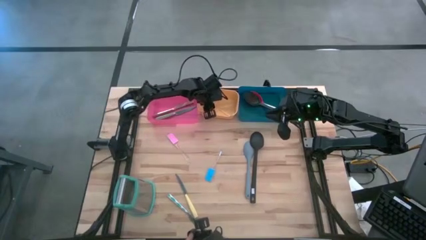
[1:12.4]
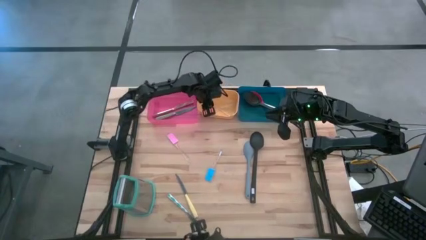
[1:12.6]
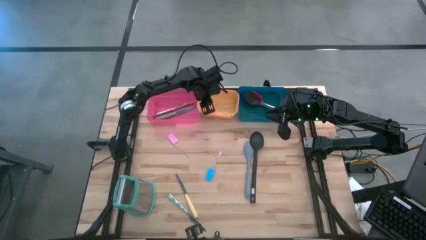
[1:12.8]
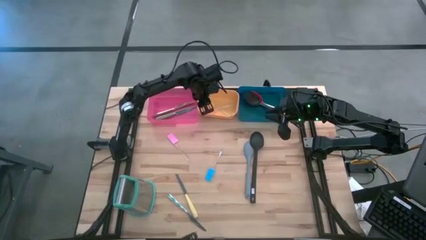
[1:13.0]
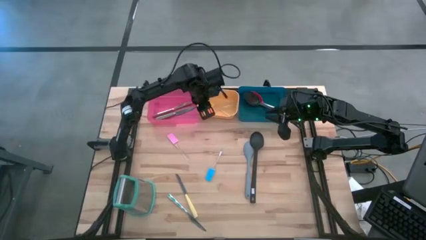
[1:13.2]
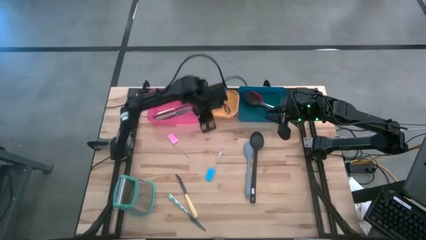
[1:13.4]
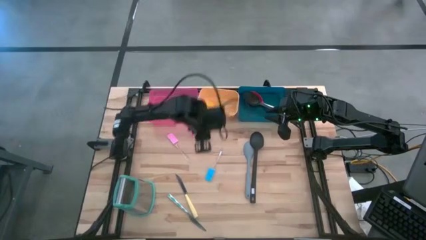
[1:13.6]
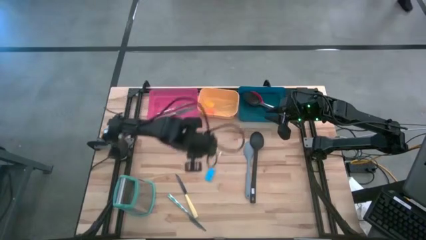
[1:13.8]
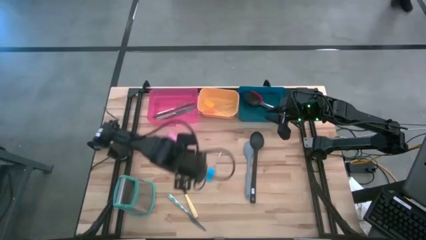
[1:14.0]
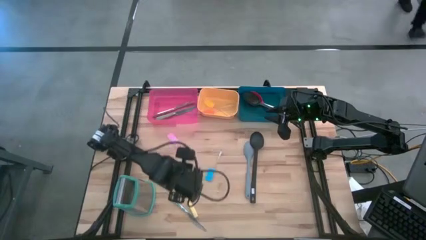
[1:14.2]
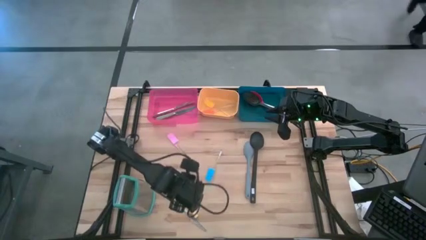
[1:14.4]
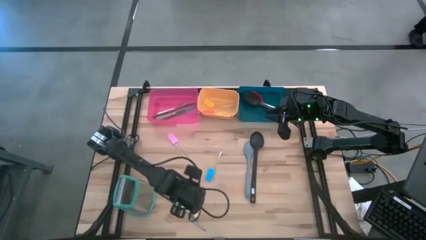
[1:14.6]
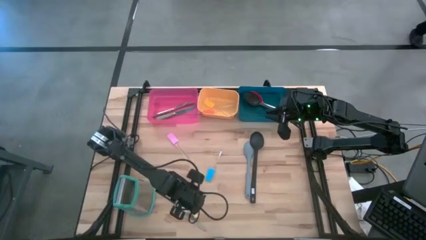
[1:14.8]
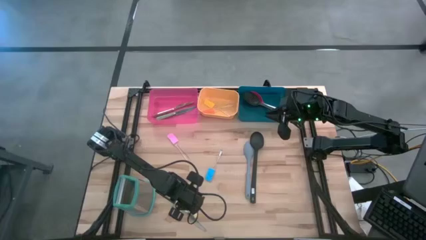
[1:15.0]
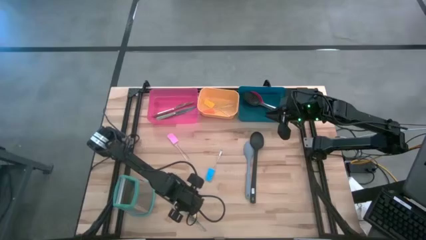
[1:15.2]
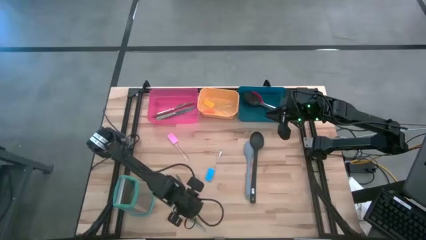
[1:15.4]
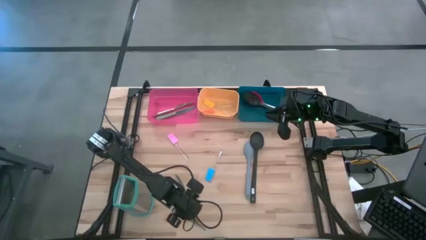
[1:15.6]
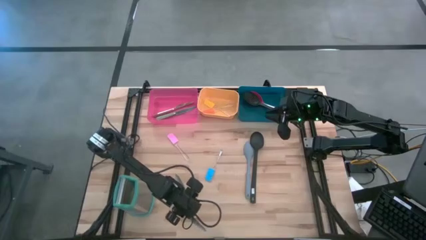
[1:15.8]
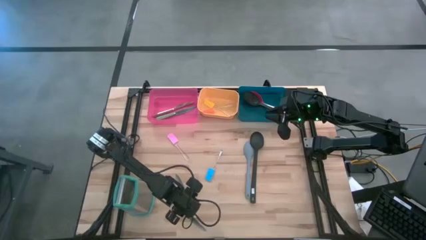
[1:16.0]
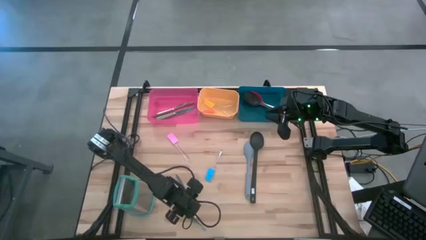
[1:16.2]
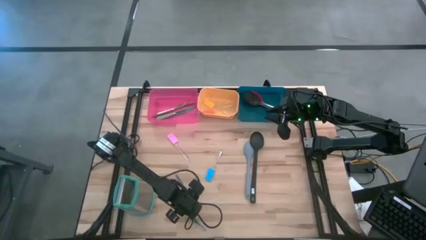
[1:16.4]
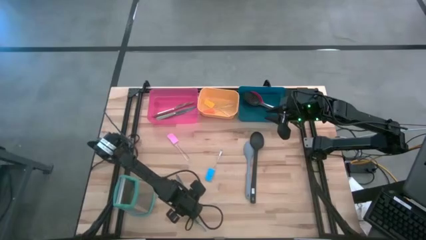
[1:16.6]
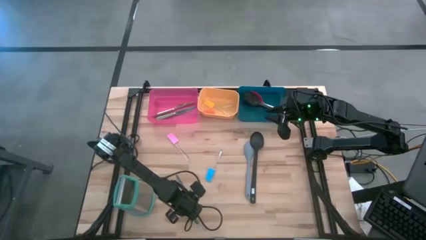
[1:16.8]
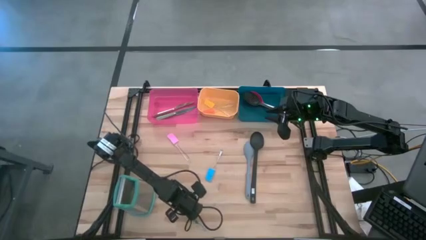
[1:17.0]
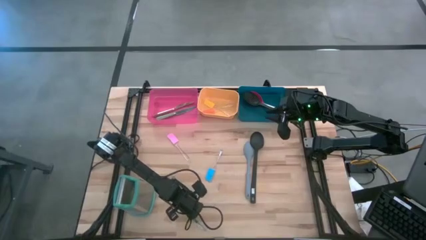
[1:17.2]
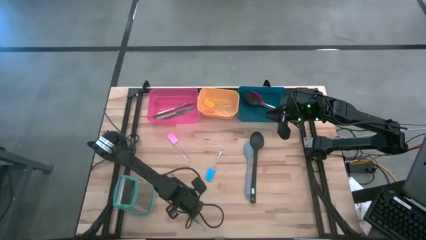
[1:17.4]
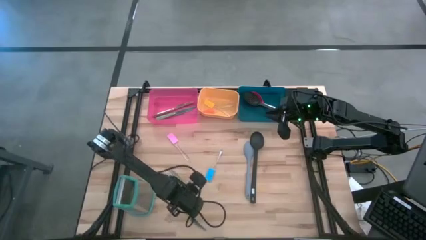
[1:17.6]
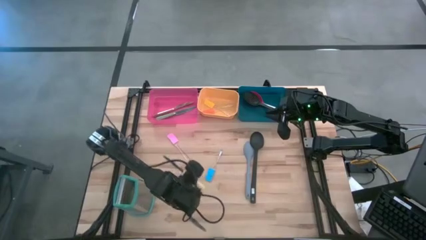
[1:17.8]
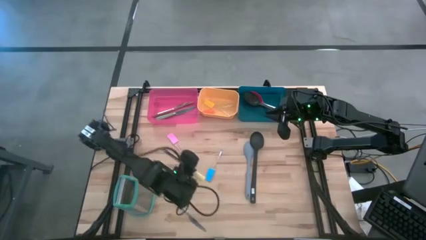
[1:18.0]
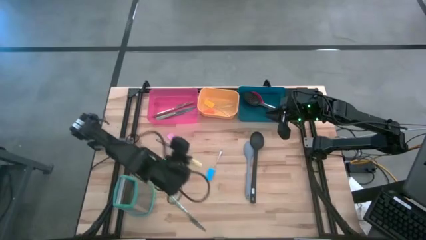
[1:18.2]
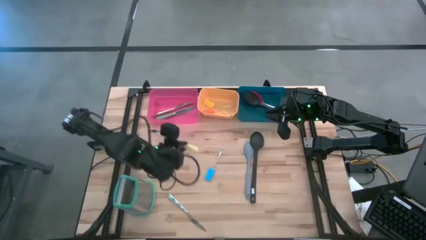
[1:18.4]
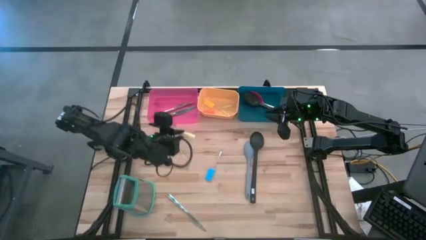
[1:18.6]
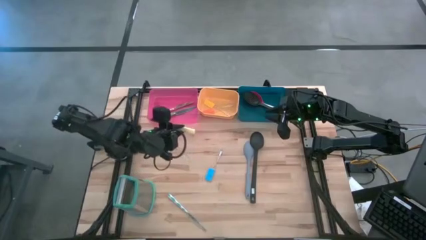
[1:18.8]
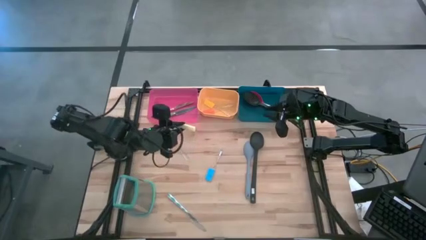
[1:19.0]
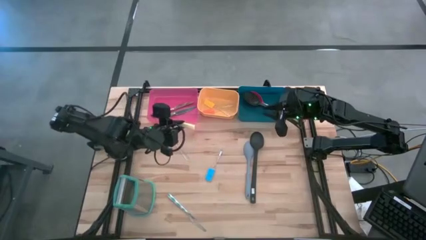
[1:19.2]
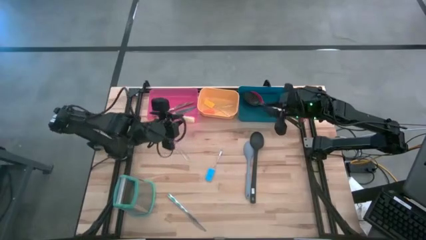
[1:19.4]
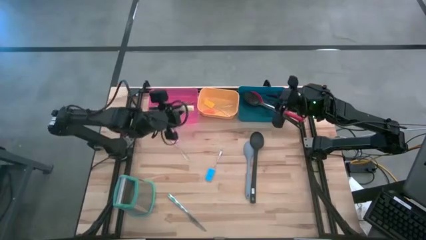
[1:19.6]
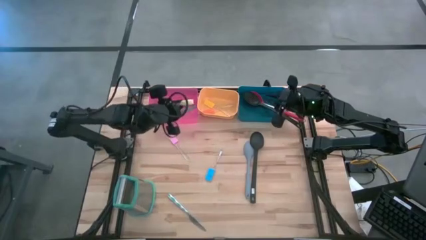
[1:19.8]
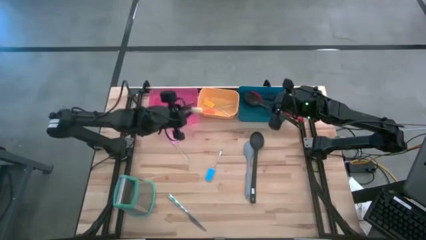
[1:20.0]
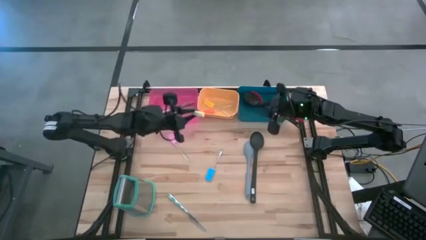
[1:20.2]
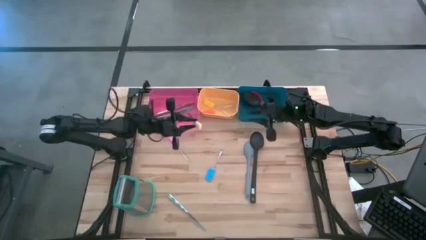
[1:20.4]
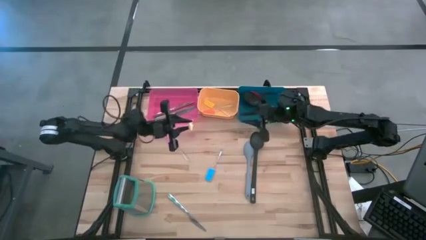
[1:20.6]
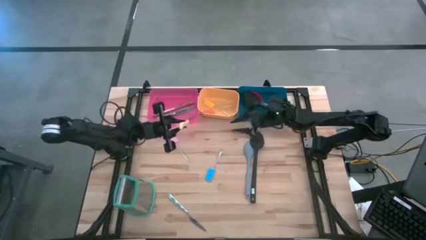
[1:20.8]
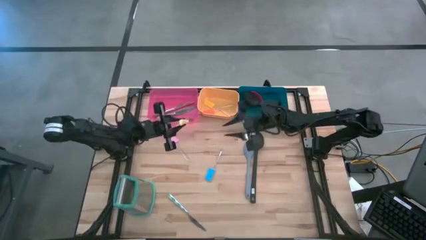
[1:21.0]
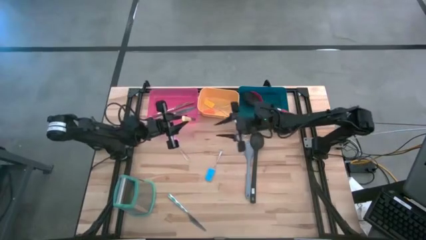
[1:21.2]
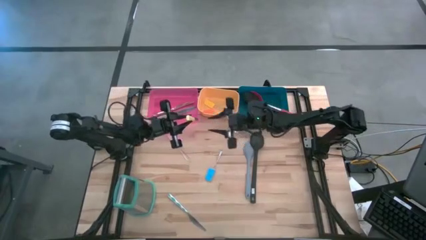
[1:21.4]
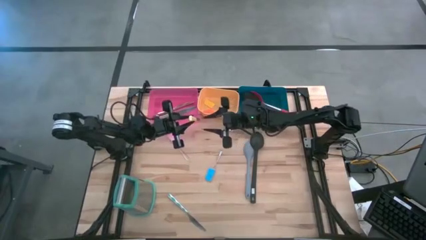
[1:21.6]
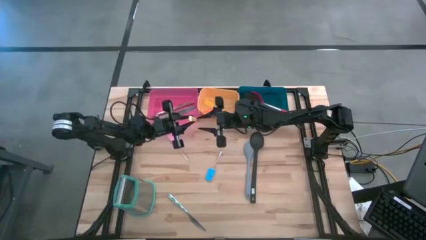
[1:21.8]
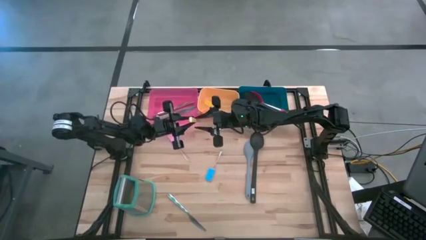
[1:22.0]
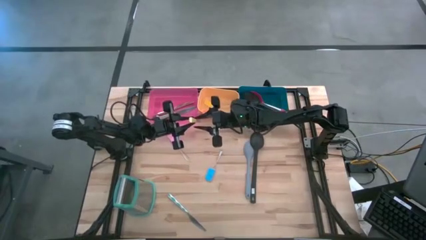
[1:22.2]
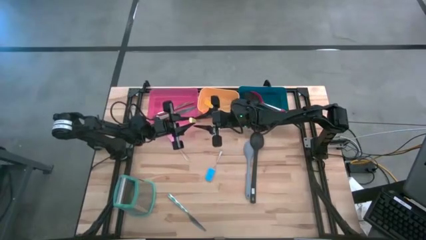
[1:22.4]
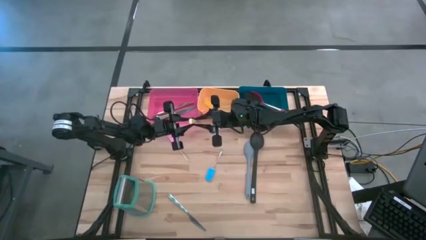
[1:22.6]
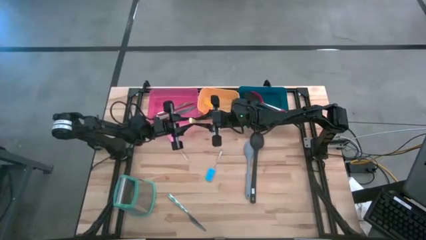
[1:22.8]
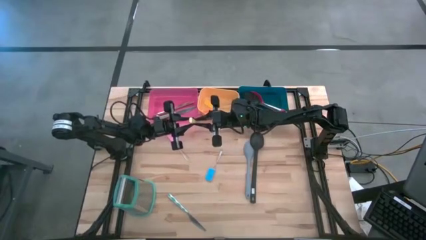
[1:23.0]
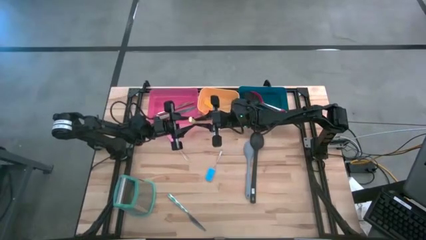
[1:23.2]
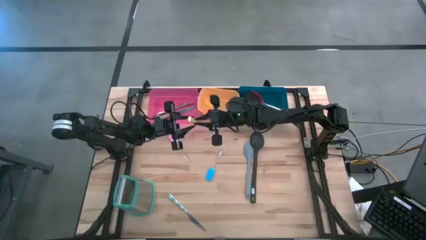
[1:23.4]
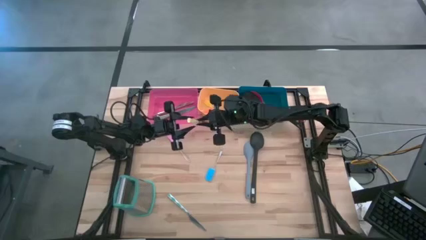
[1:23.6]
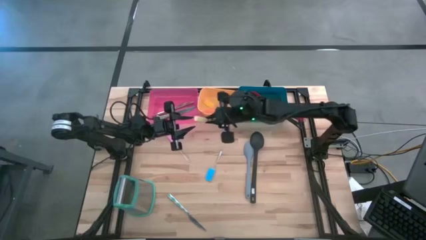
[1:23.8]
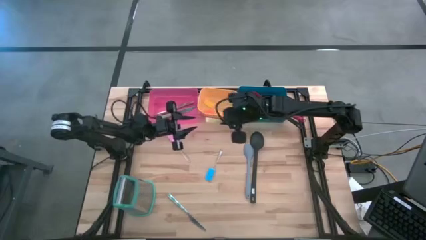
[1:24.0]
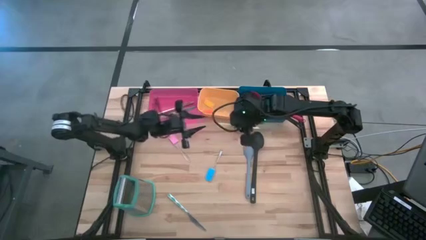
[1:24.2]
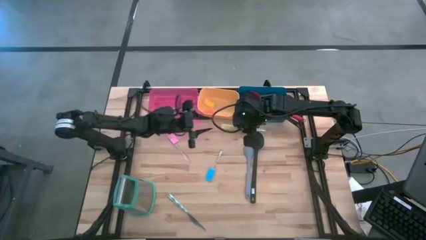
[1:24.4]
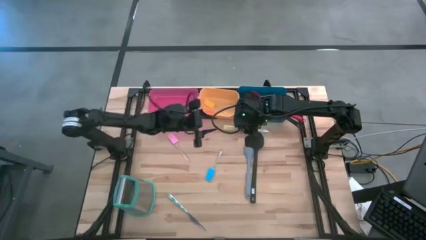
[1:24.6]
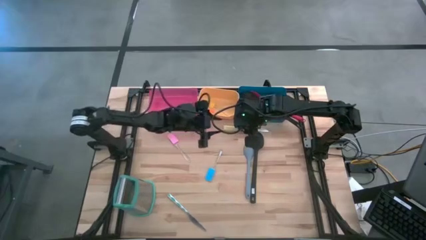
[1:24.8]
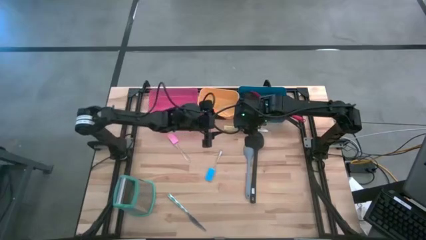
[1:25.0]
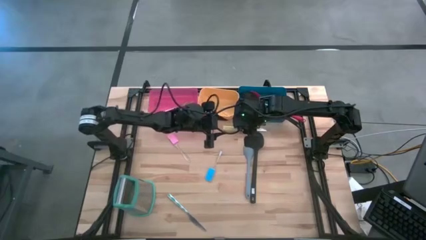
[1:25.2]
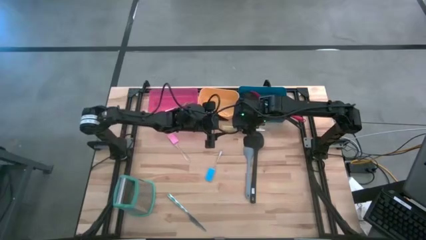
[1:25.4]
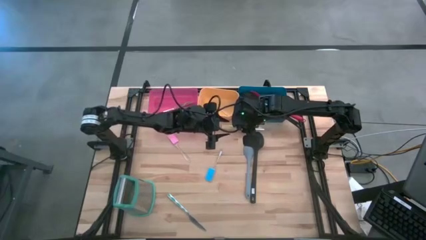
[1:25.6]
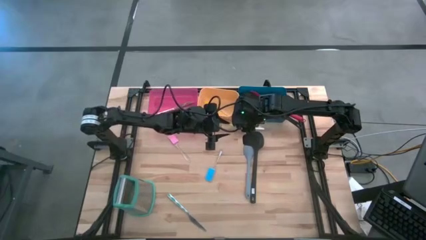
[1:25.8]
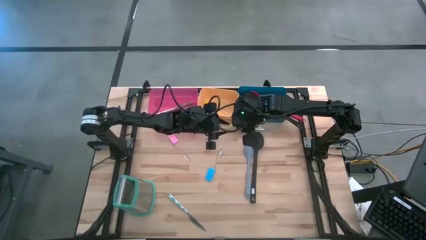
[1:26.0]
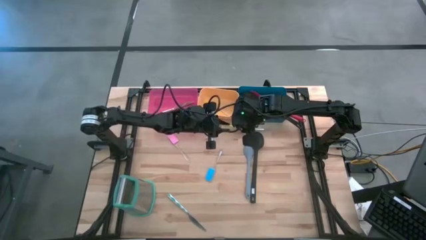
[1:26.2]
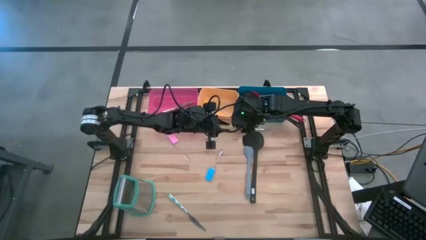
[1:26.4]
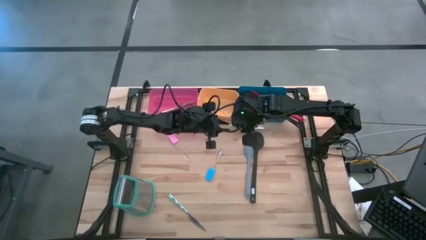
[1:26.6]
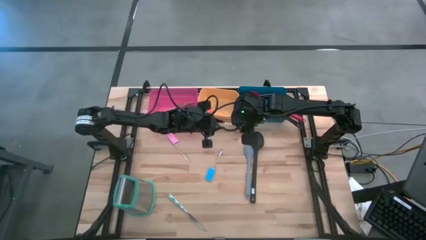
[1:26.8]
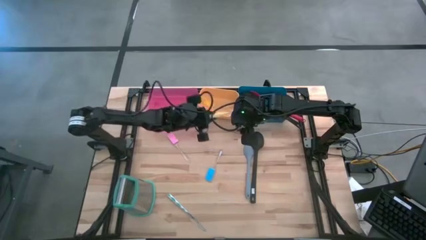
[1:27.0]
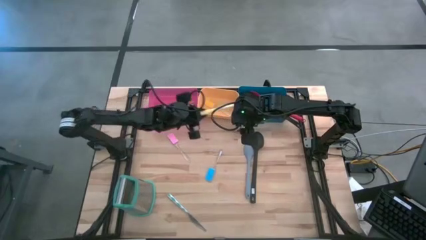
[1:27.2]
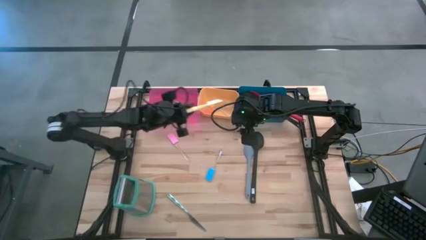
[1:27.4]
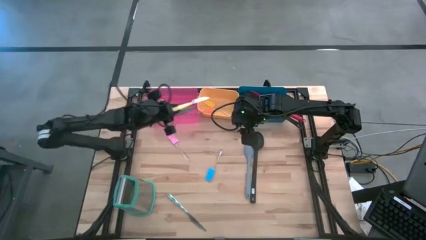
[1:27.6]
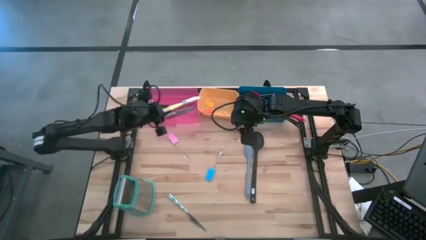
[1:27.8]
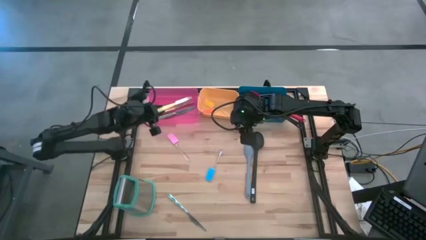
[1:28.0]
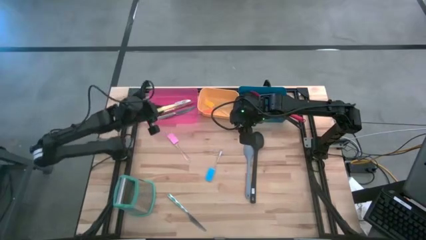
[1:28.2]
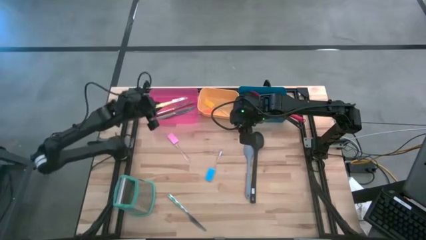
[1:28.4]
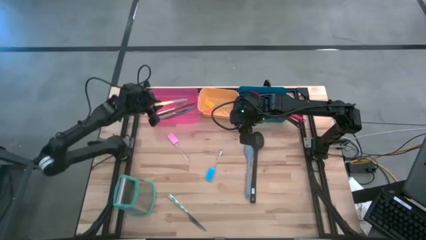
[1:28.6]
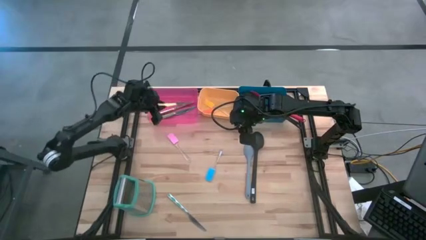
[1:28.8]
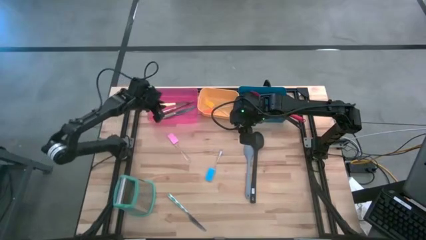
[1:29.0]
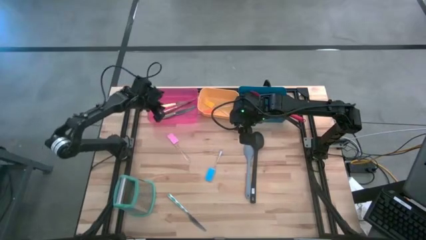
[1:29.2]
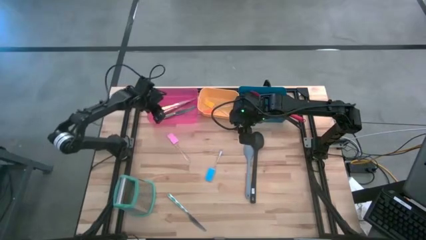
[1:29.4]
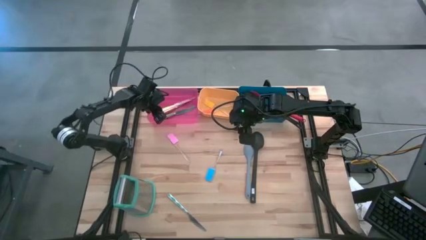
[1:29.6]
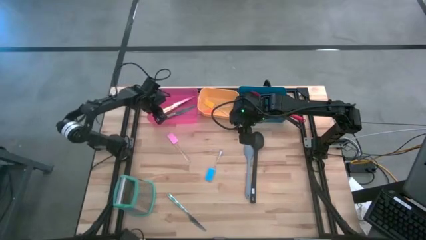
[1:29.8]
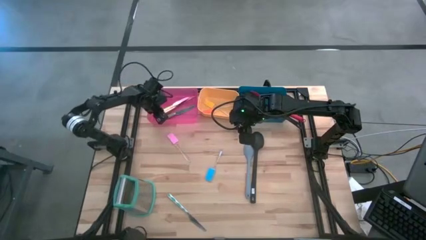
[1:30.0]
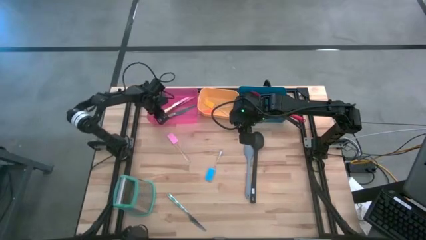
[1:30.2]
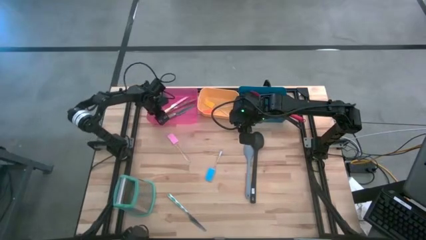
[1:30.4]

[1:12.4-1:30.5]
Task: Pick & Place Kitchen Items
Put the yellow knife into the red bin
